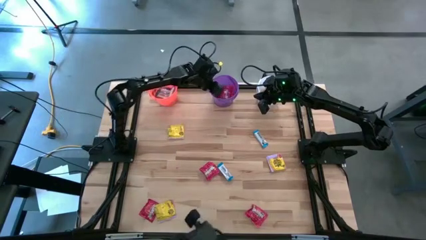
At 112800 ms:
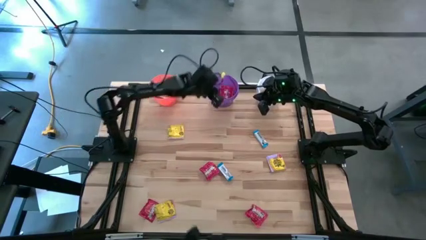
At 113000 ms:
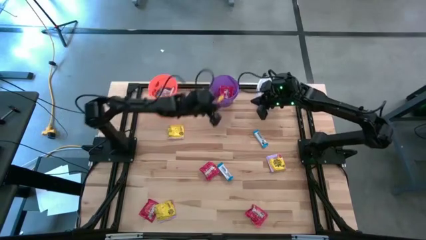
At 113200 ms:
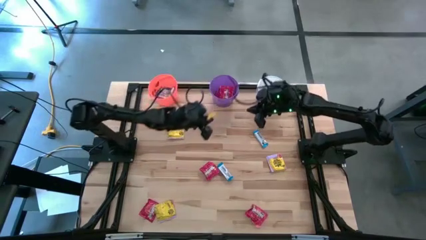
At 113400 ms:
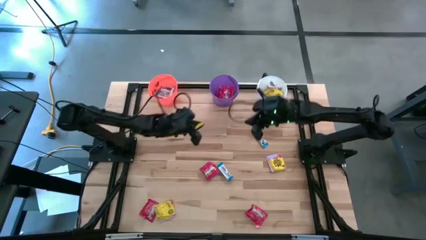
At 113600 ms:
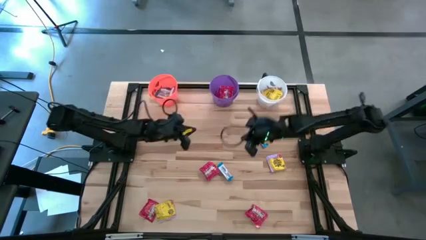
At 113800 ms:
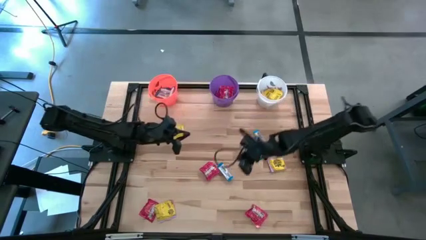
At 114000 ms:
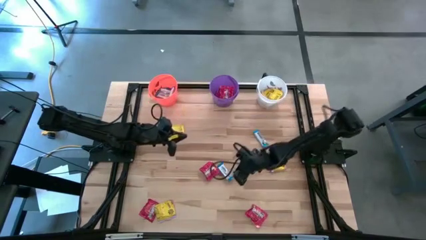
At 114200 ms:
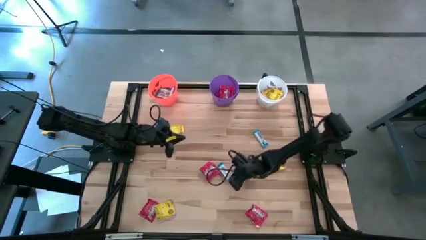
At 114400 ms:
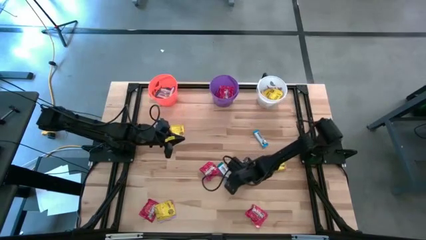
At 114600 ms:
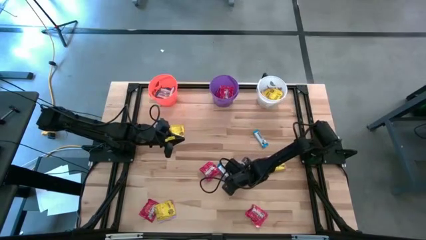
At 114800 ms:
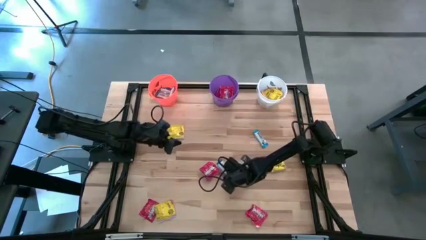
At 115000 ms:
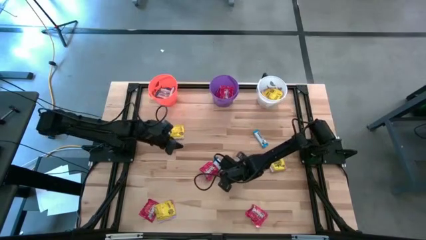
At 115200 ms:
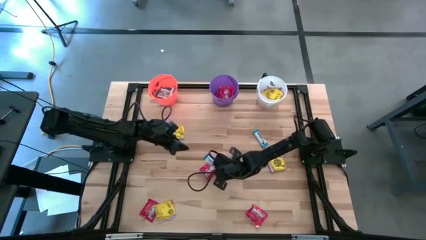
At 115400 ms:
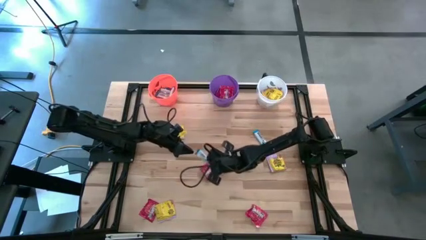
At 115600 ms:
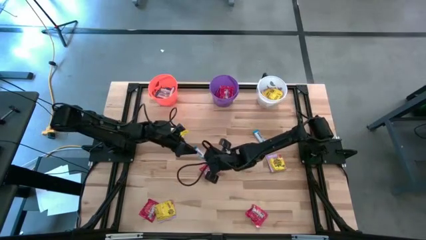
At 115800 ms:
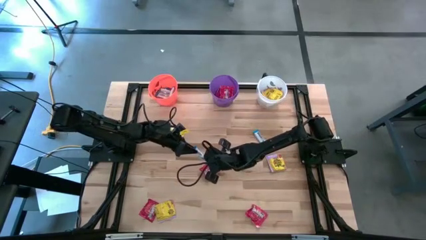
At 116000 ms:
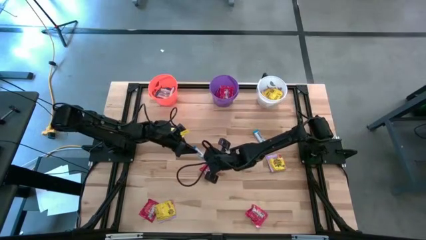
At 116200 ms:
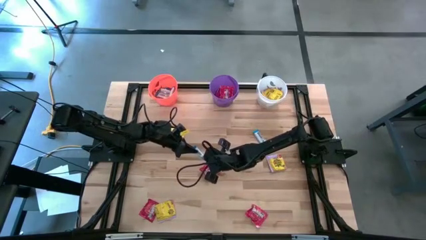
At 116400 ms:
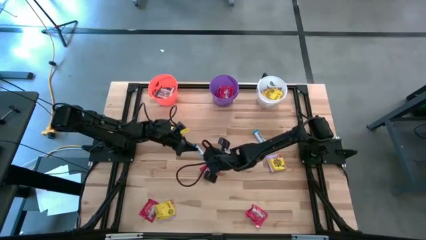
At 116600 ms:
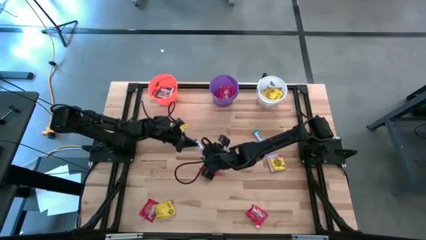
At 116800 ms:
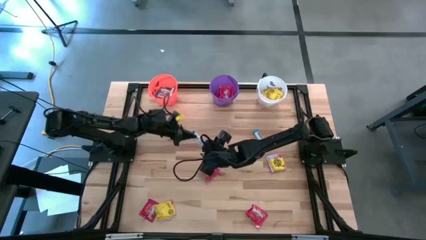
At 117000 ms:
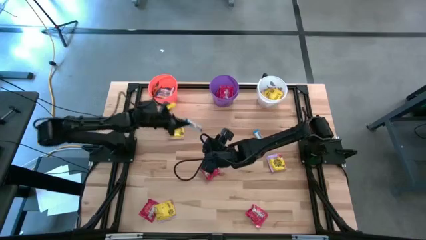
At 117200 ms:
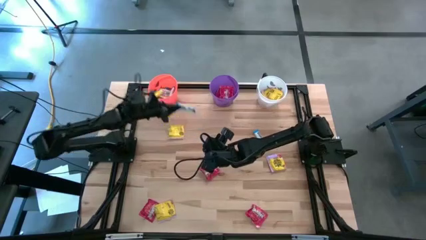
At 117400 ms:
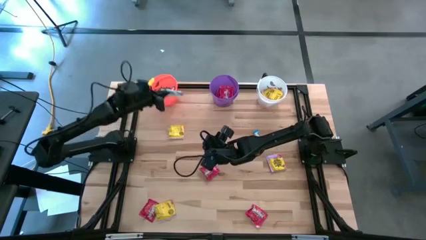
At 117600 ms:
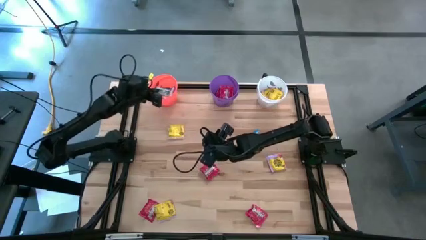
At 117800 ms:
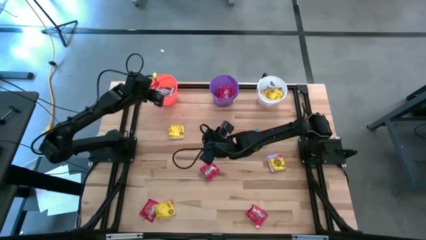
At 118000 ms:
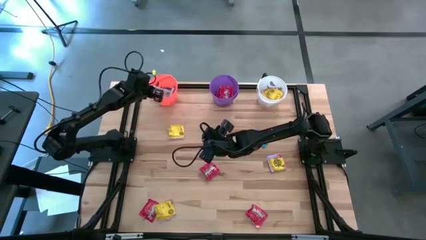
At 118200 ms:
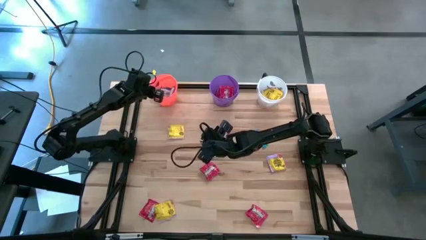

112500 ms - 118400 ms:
Task: Sort candy
Put the white chocolate bar into the orange bucket

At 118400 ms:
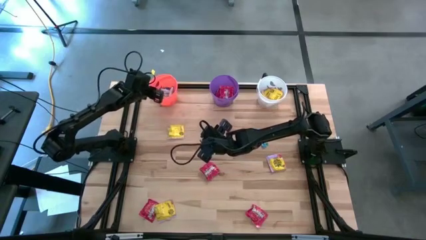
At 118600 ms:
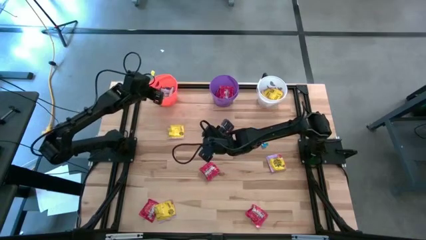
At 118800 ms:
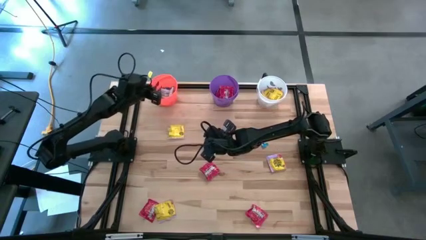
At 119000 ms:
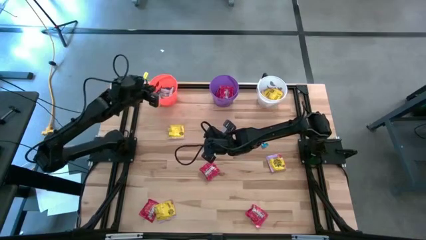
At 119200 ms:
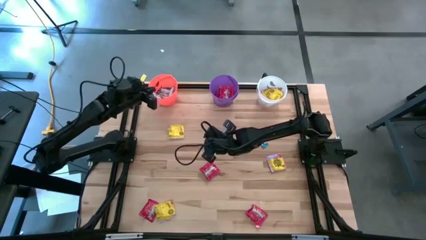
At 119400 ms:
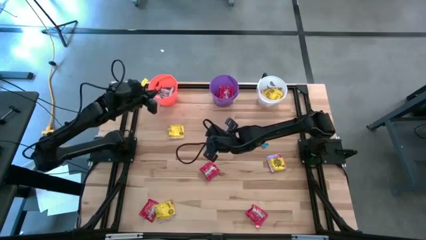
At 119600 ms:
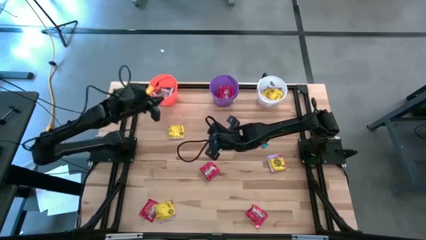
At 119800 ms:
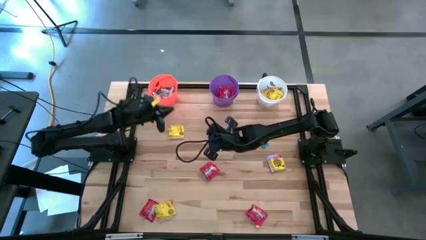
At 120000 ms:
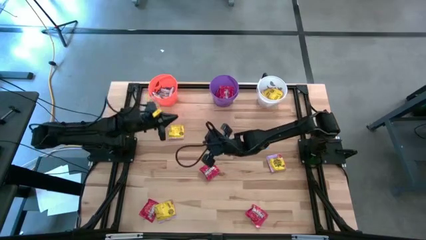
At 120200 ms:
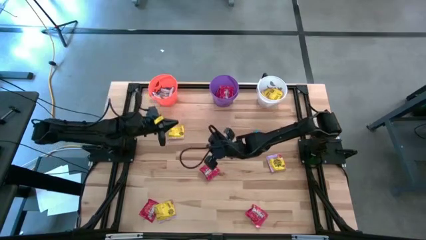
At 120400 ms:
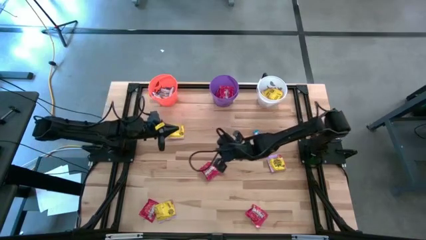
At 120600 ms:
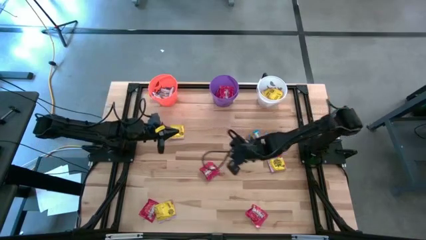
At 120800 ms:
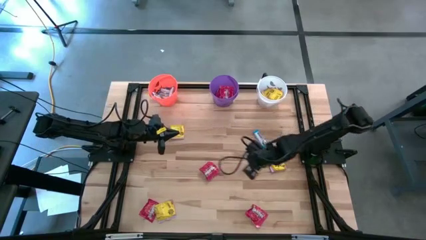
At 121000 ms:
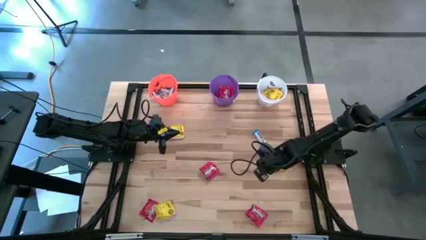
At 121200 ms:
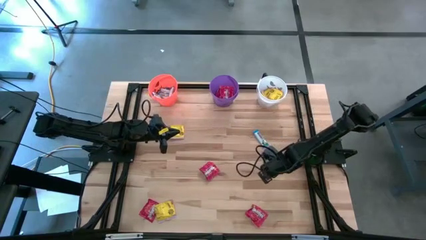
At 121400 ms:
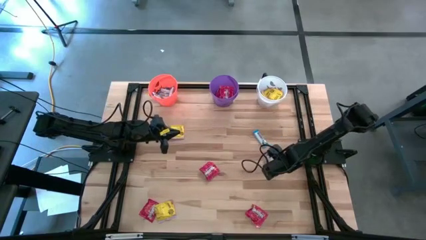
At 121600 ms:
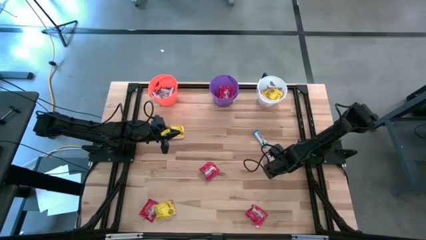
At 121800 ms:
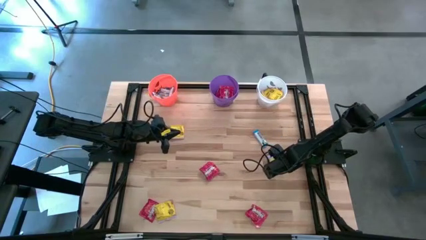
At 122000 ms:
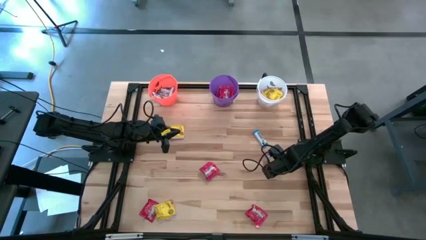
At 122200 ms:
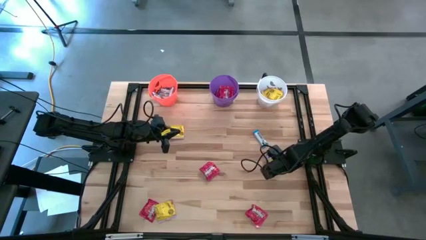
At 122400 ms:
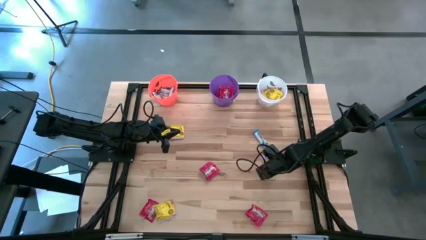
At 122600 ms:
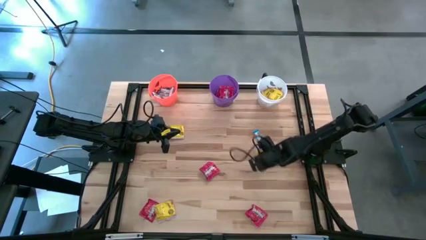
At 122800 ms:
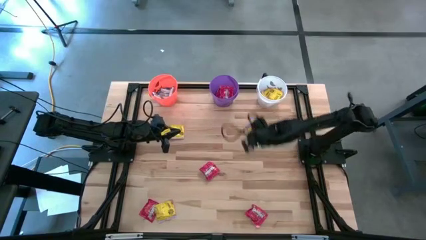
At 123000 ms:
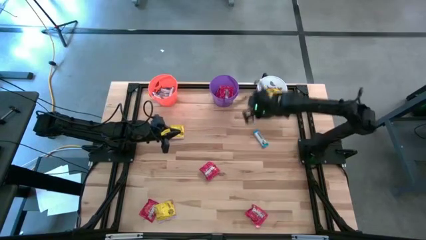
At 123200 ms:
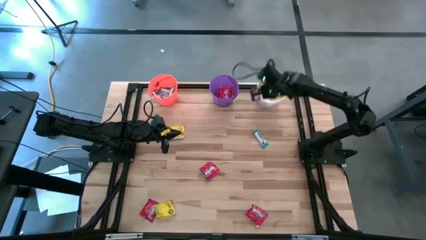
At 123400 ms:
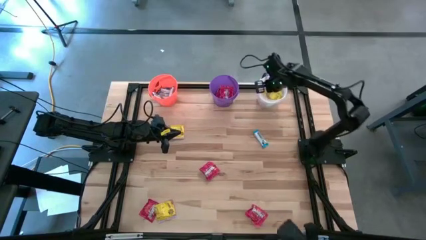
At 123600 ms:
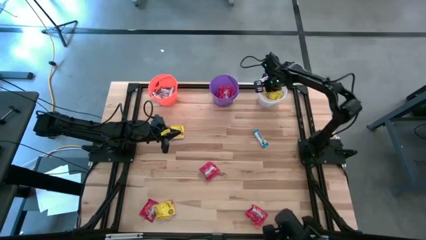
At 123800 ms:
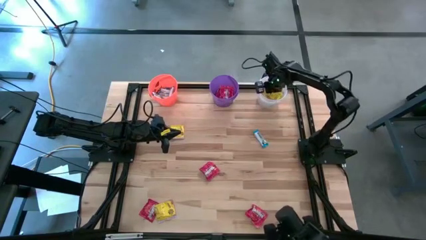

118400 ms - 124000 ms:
Put the yellow candy into the white bucket

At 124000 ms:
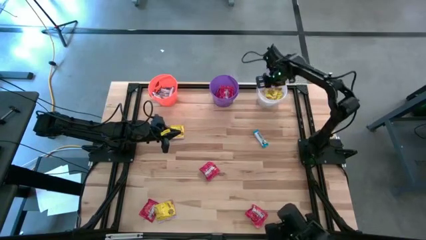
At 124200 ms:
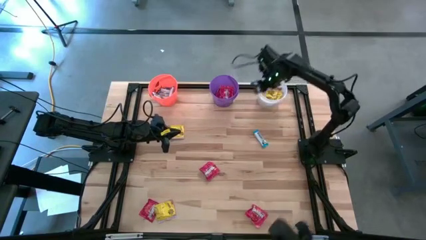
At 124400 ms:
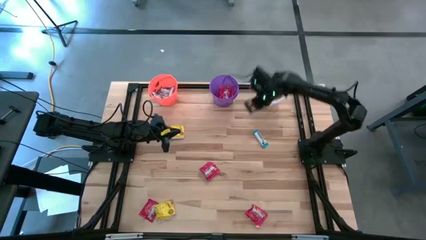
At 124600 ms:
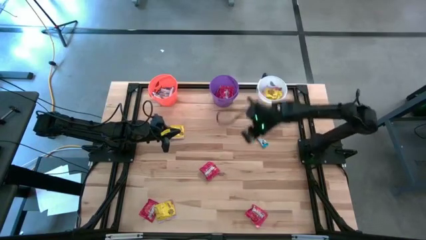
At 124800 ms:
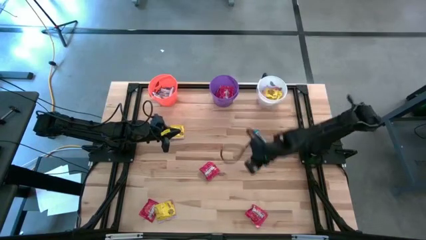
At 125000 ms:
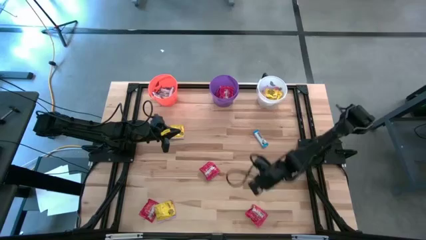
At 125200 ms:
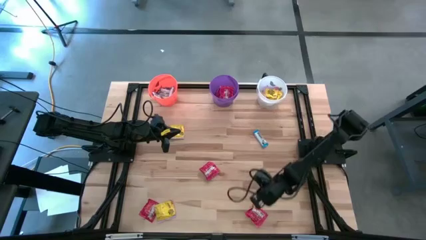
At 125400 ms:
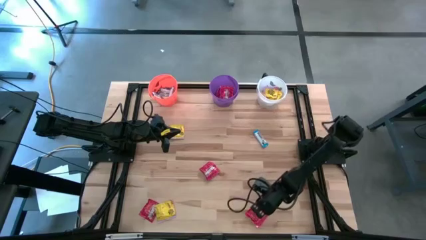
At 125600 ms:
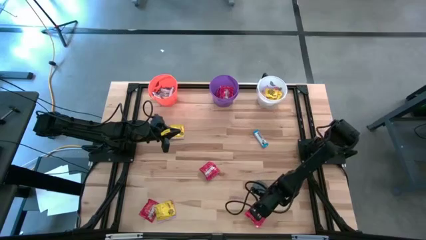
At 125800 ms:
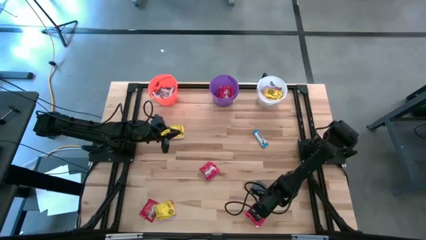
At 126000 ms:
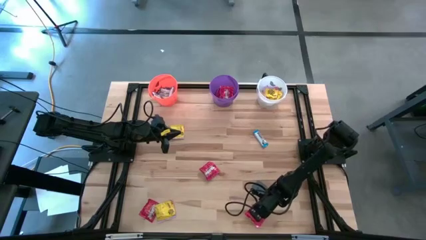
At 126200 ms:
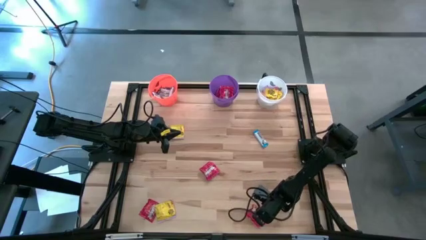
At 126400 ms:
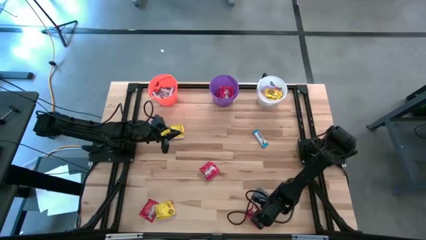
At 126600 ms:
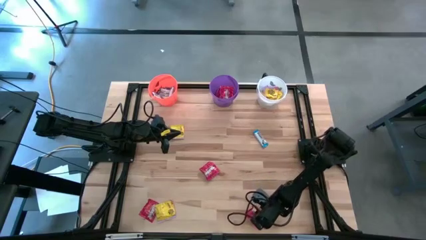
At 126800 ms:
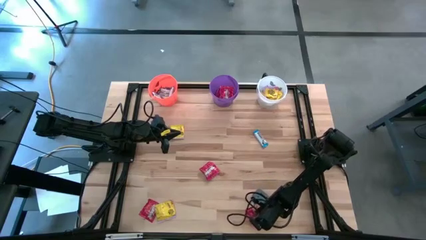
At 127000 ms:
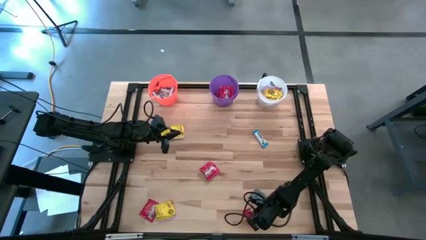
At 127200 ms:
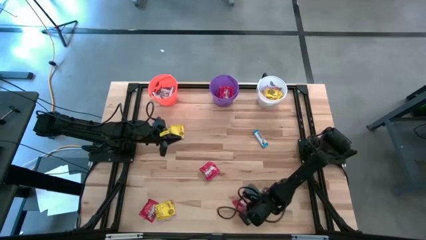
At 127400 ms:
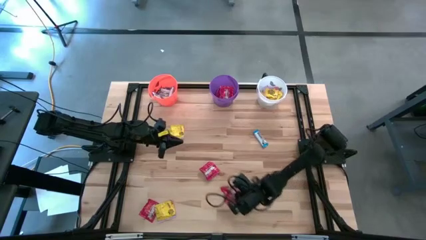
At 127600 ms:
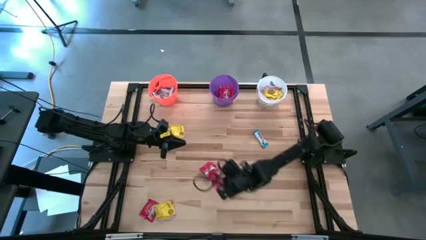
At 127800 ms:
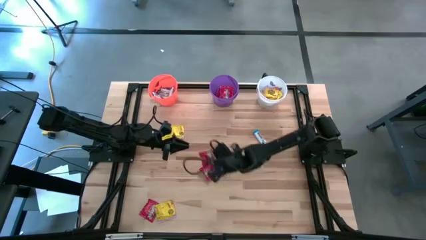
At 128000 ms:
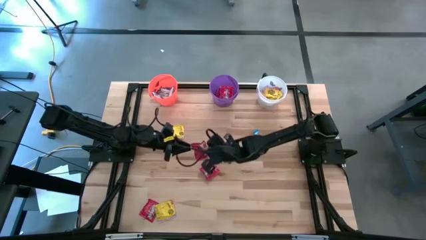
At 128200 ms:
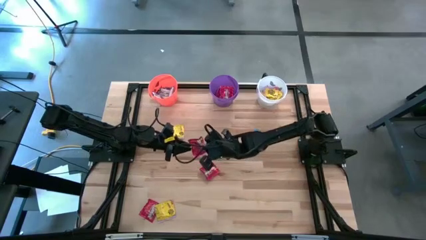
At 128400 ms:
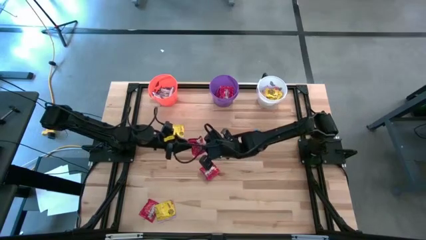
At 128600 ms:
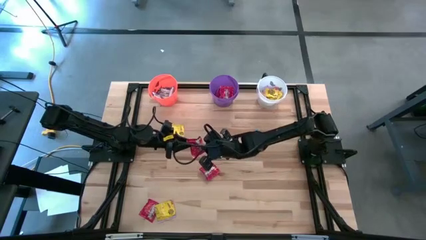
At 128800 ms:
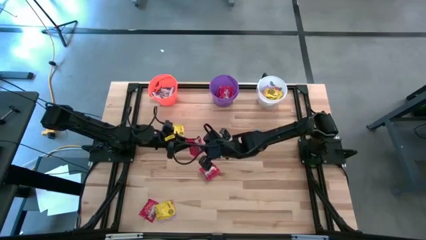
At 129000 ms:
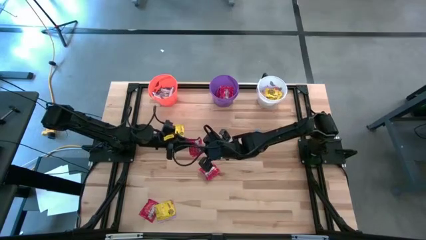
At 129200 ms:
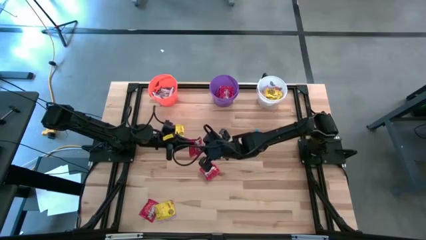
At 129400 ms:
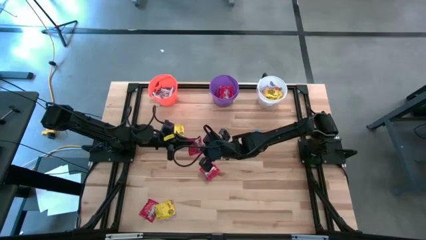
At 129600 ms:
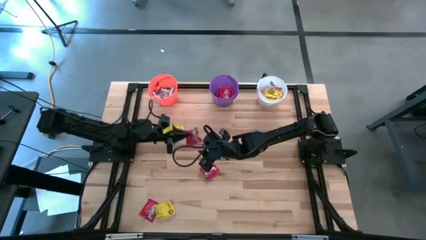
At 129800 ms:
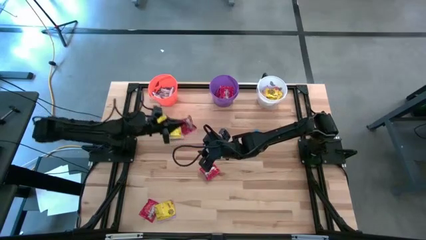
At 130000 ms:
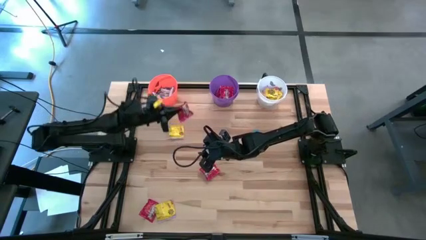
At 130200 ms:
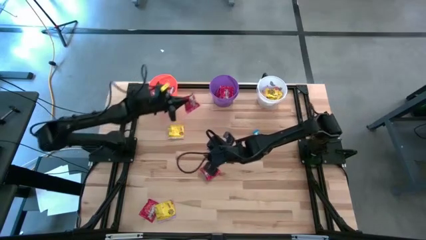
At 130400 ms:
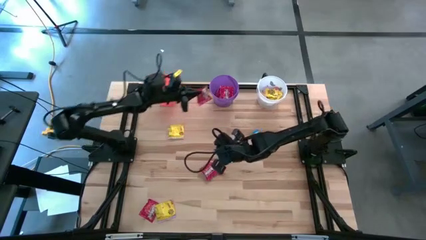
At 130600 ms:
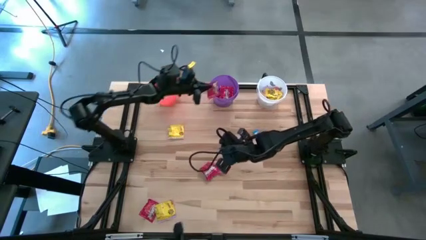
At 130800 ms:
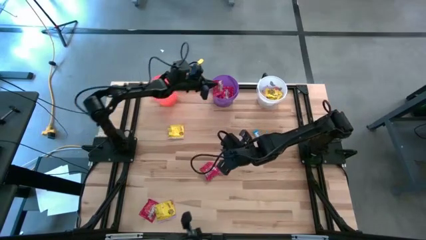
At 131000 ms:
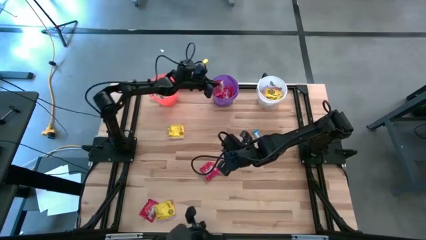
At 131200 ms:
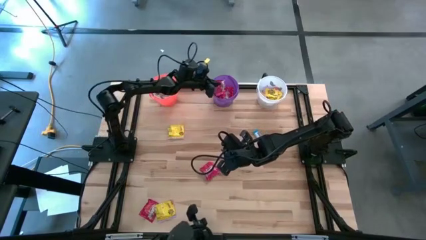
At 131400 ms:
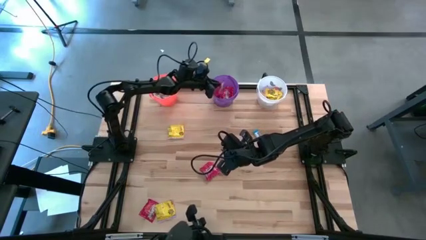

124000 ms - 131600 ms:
Put the red candy into the purple bucket
